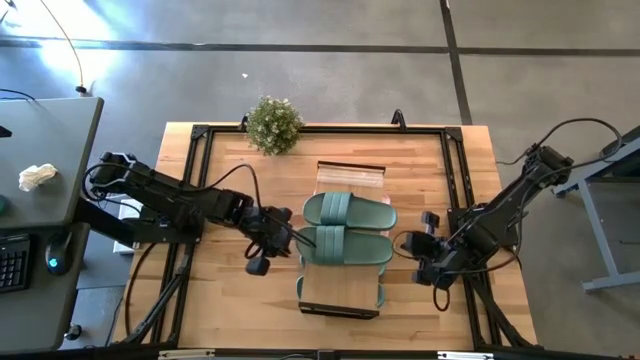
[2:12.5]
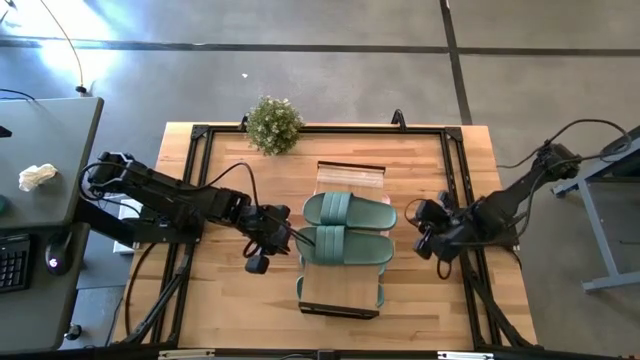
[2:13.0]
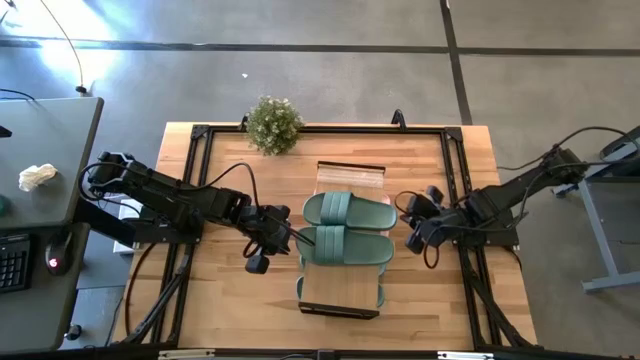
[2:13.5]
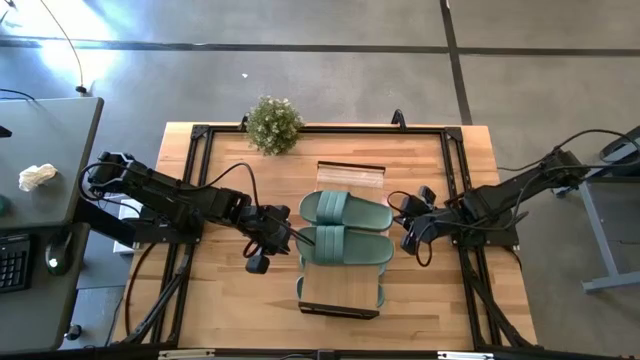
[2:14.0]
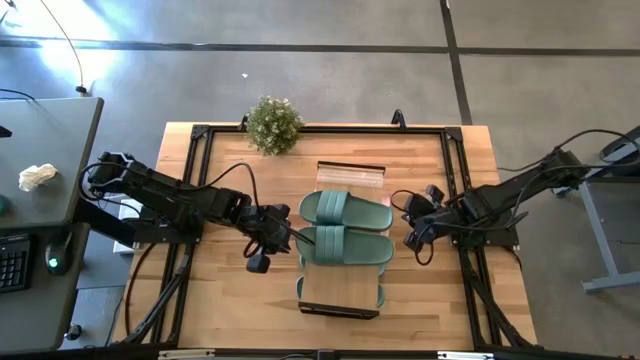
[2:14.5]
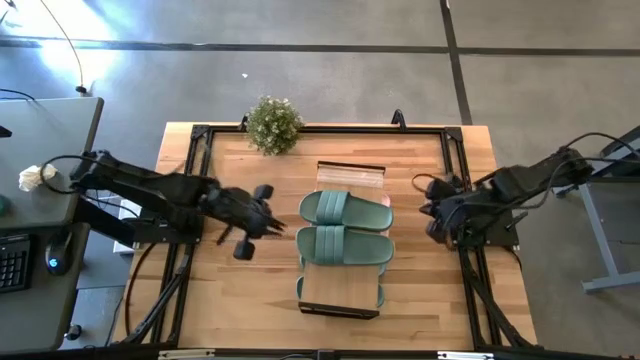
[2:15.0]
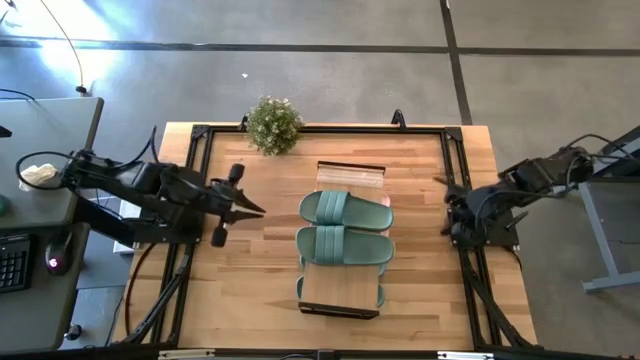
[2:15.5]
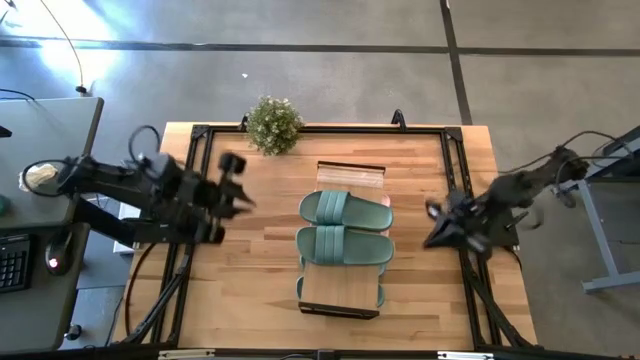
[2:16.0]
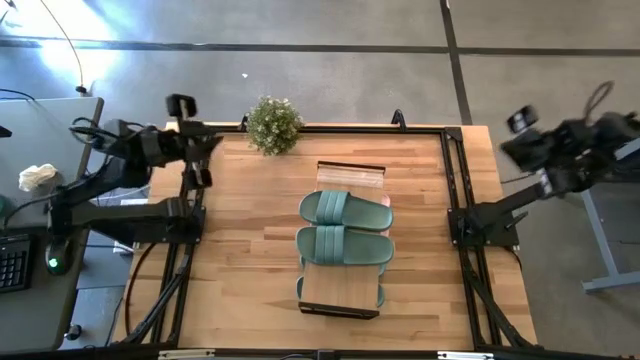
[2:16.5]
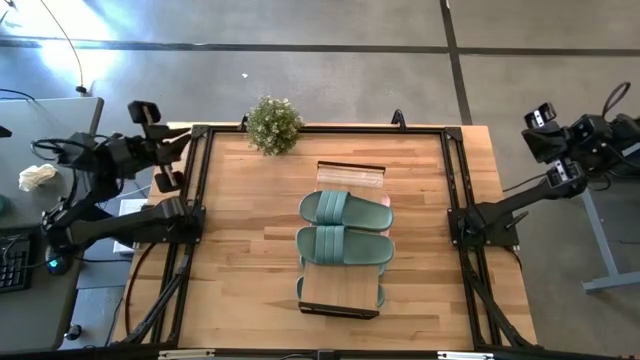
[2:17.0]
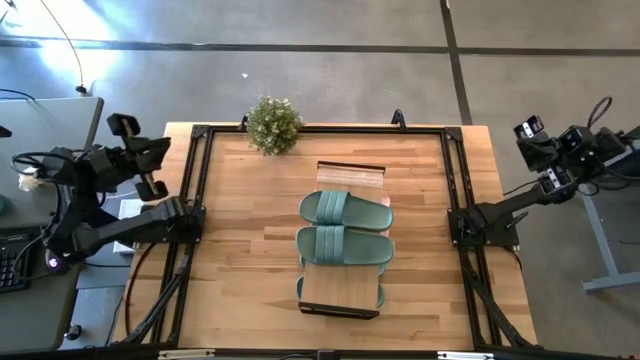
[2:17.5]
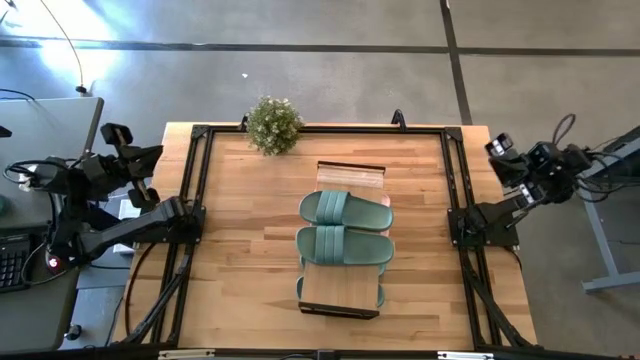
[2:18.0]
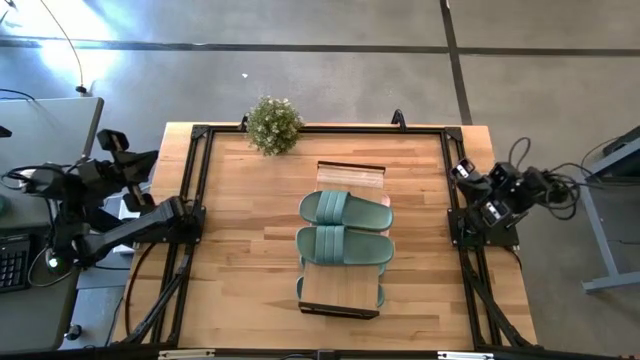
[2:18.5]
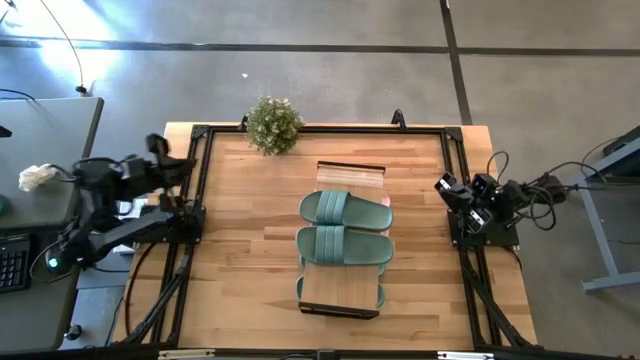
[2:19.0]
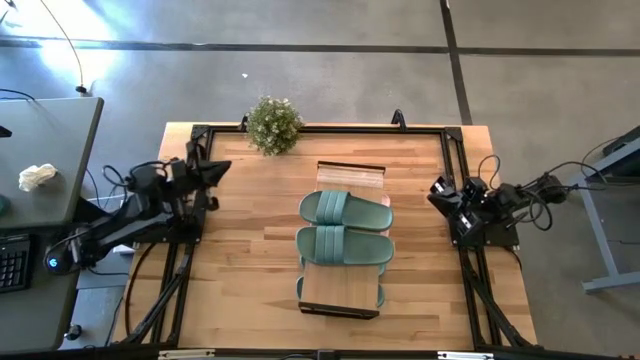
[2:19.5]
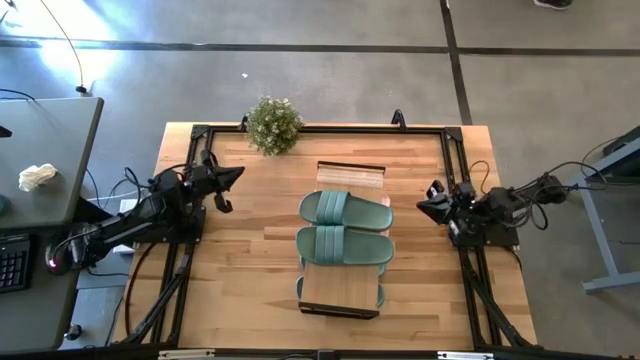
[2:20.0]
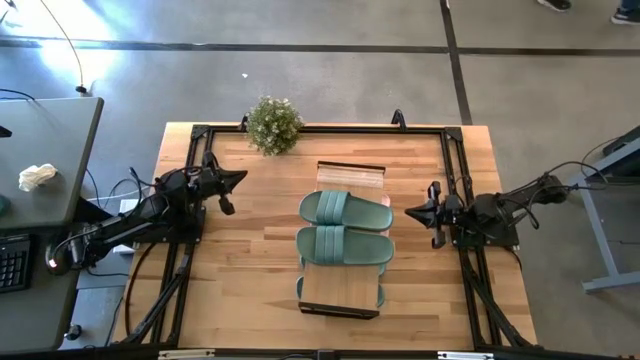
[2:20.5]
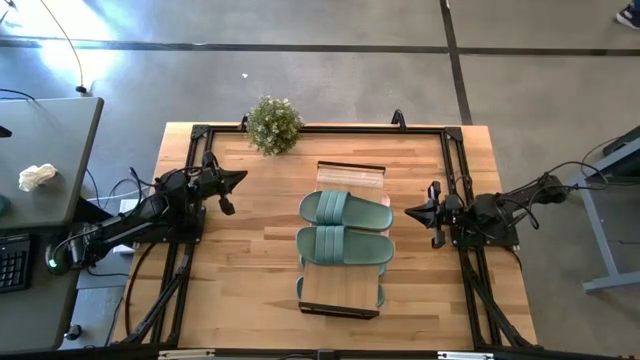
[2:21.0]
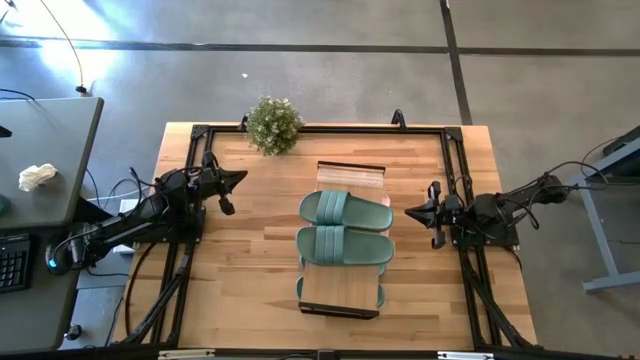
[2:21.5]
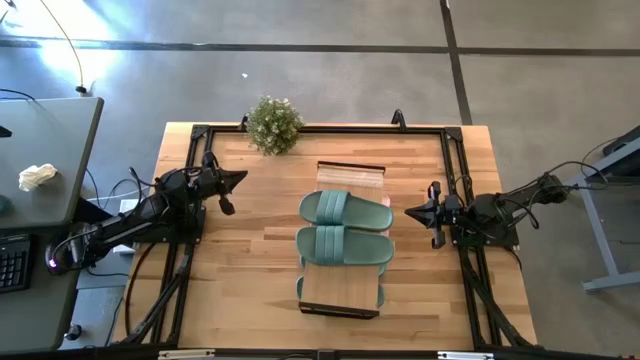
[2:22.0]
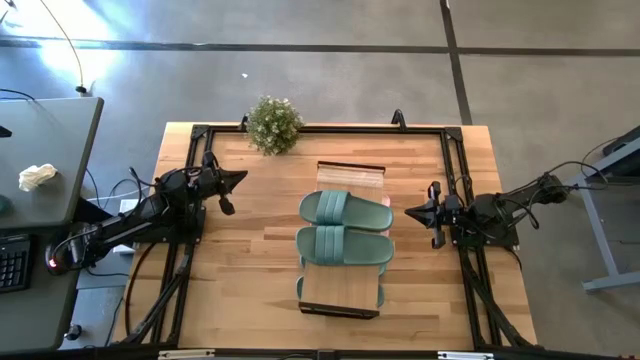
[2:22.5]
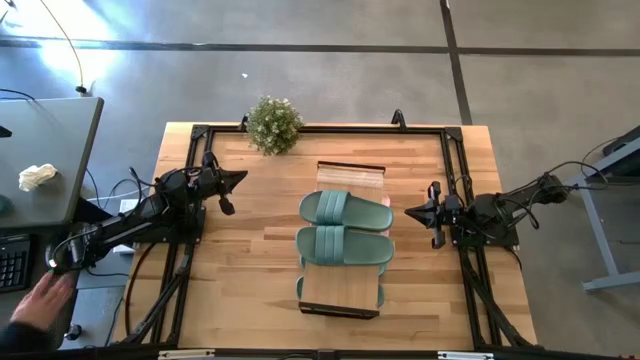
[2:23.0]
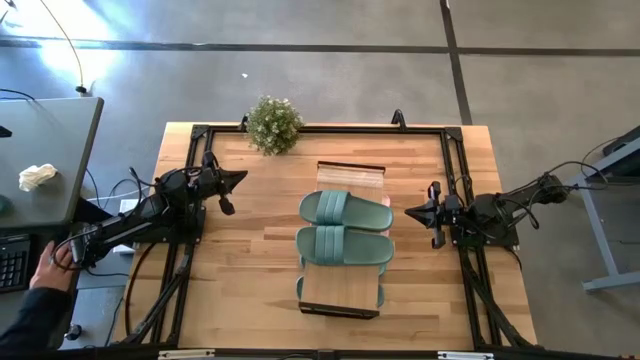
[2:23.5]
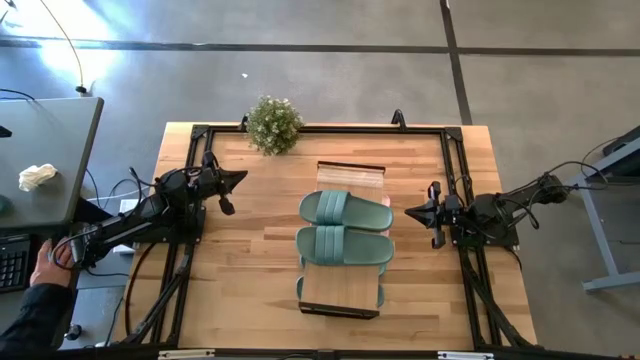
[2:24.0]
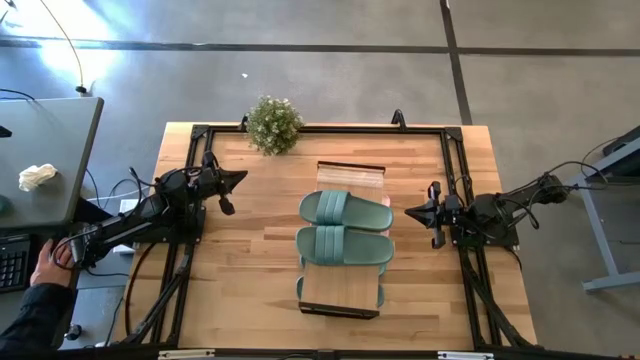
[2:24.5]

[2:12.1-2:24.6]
Task: Pick and place slides into the shelf
Return to Home Position

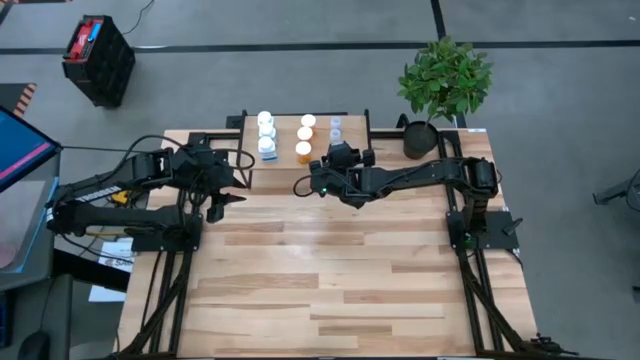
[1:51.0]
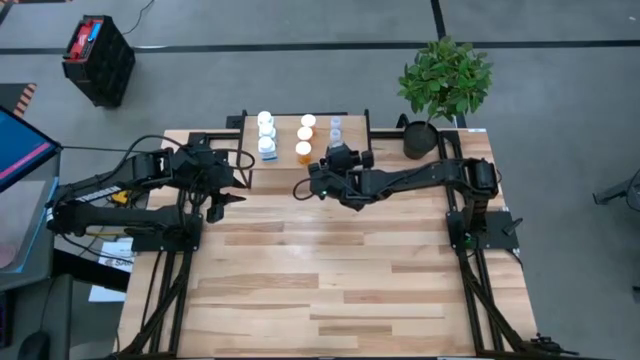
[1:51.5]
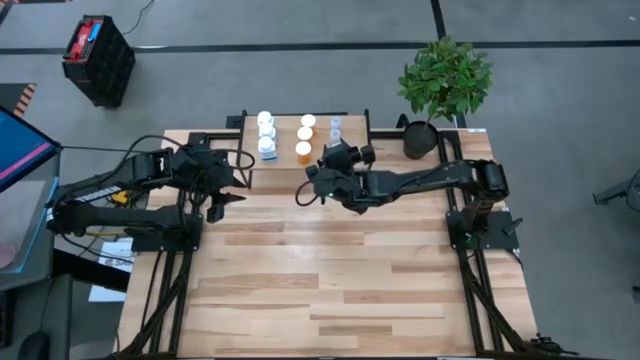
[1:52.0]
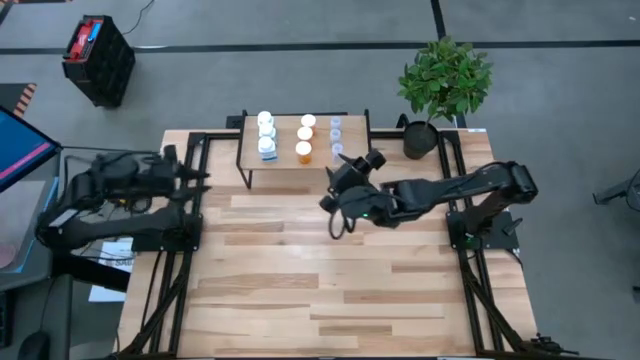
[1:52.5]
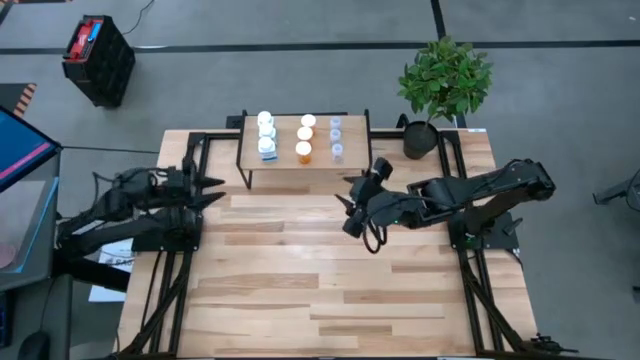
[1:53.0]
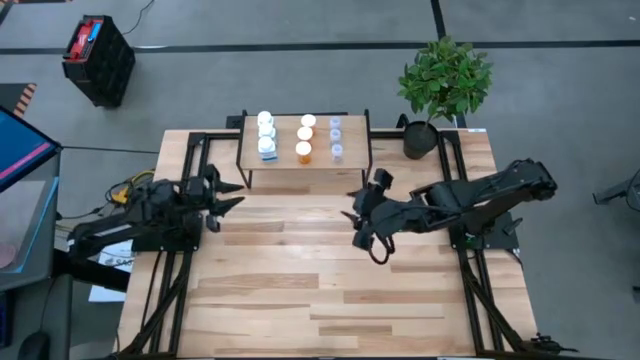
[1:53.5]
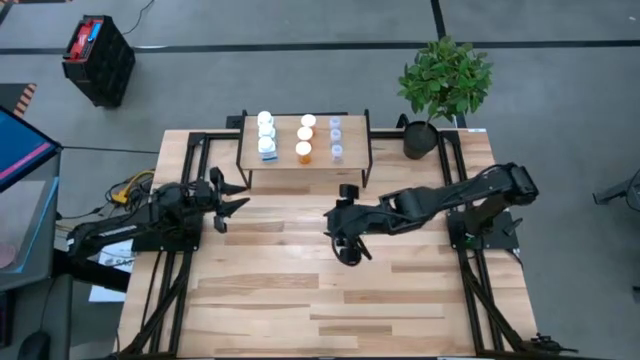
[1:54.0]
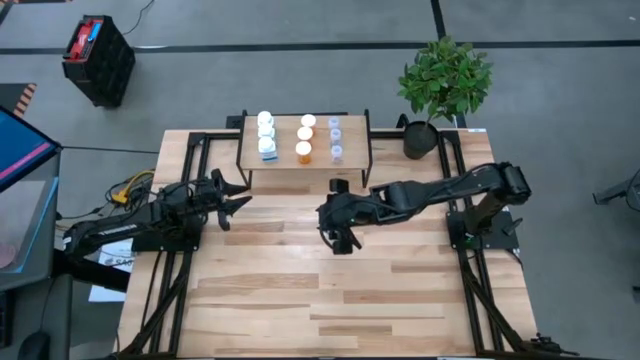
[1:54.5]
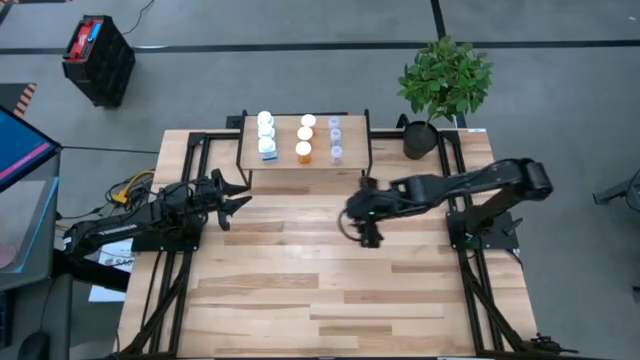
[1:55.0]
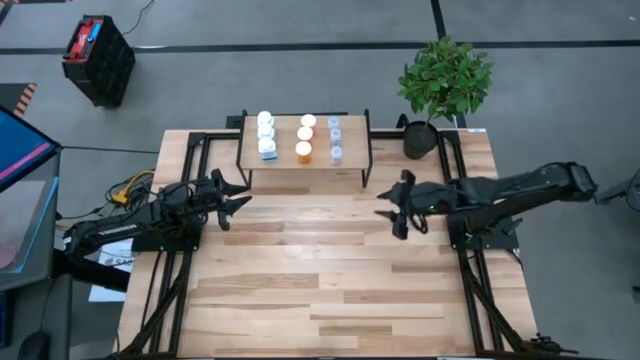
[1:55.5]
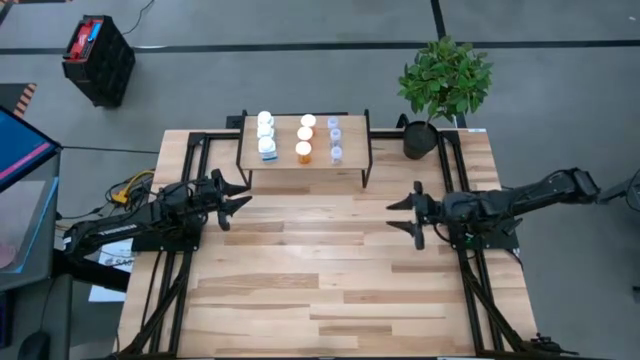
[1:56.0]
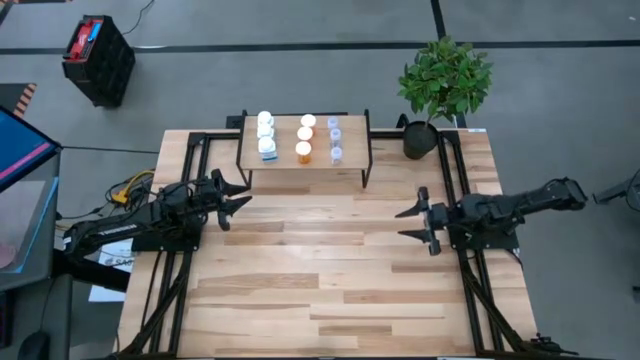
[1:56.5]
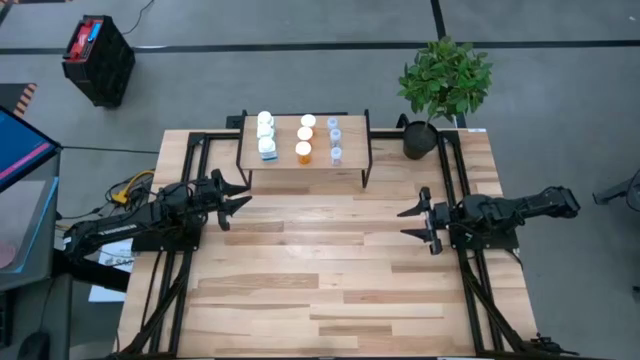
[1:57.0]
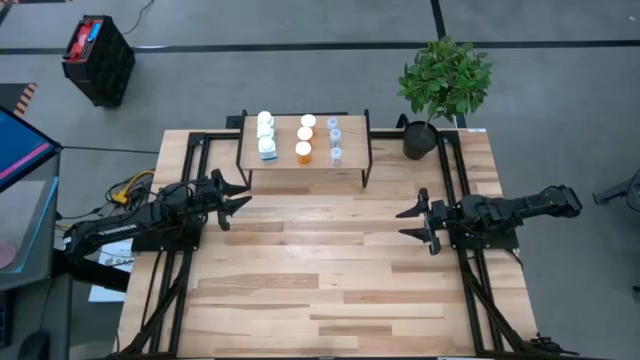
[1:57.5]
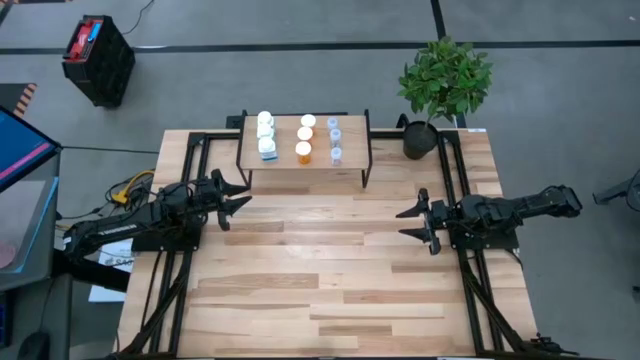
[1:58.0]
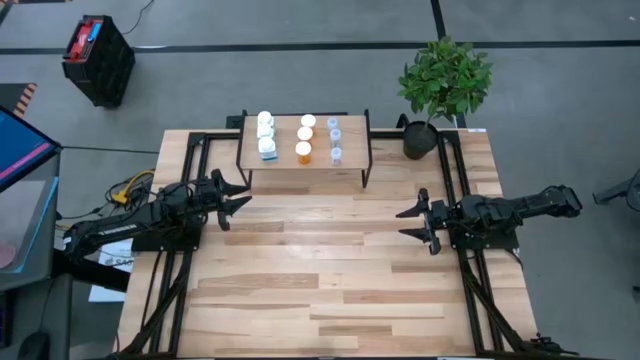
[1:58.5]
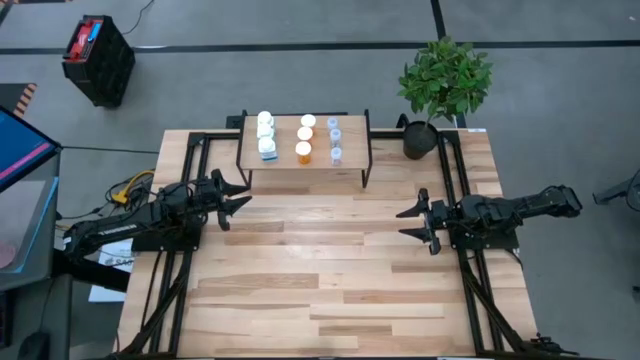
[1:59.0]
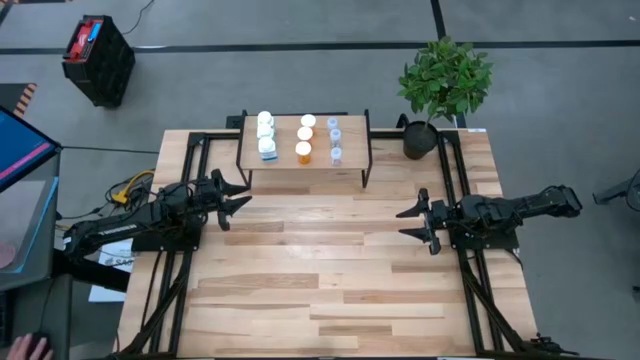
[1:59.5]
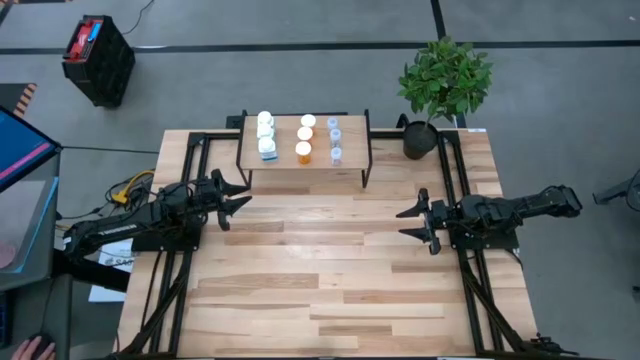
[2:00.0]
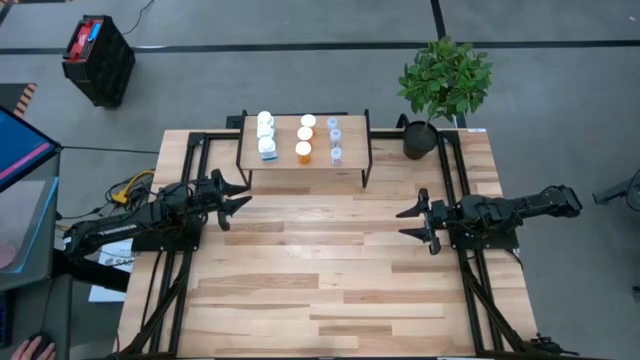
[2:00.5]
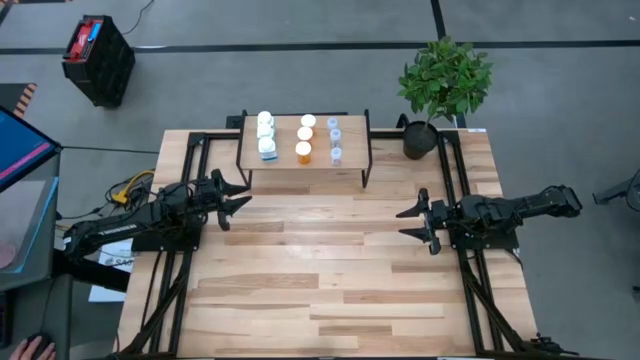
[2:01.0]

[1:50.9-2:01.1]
Task: Pick and place medicine bottles onto shelf by color
Return to Home Position
